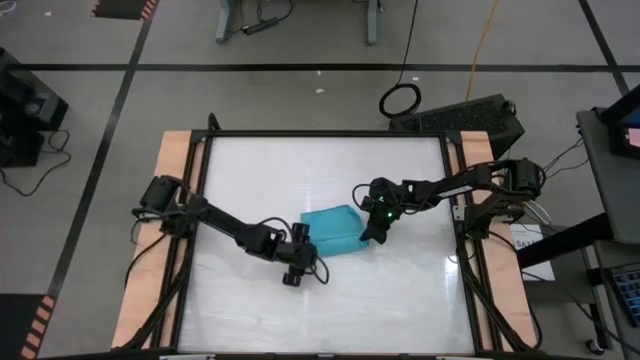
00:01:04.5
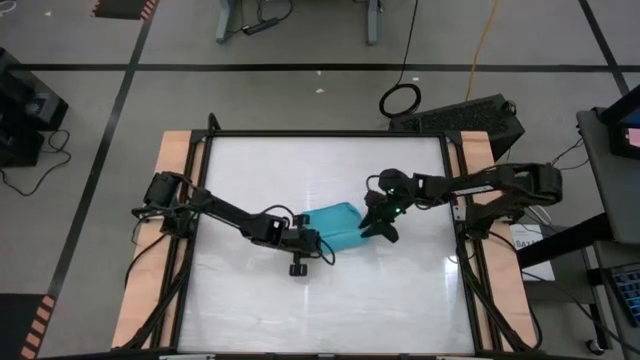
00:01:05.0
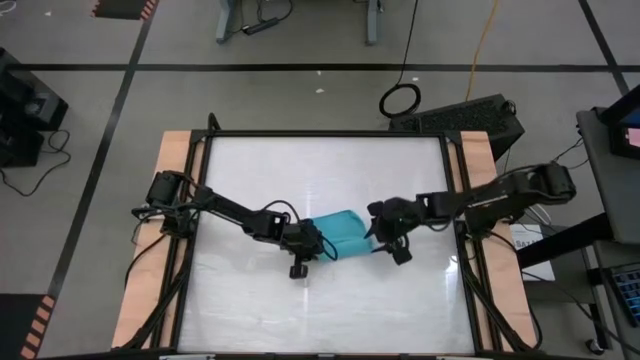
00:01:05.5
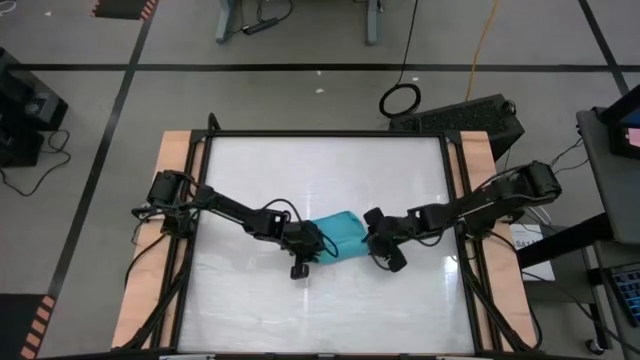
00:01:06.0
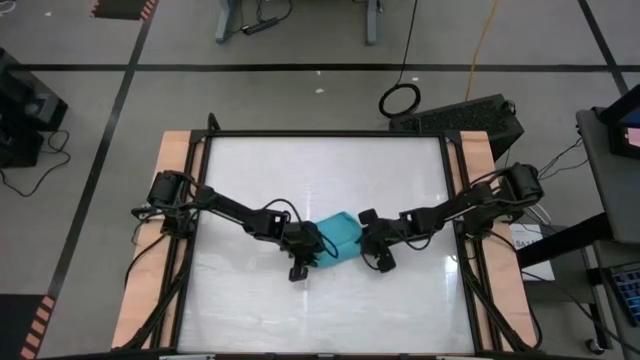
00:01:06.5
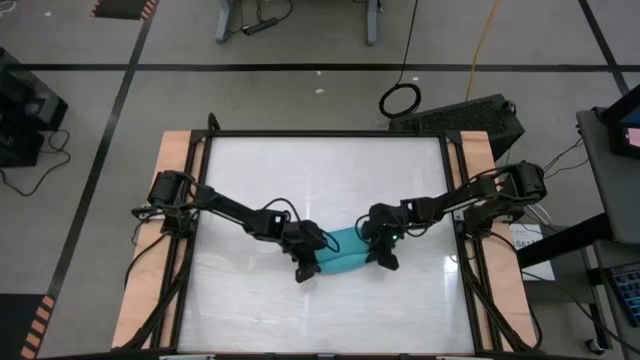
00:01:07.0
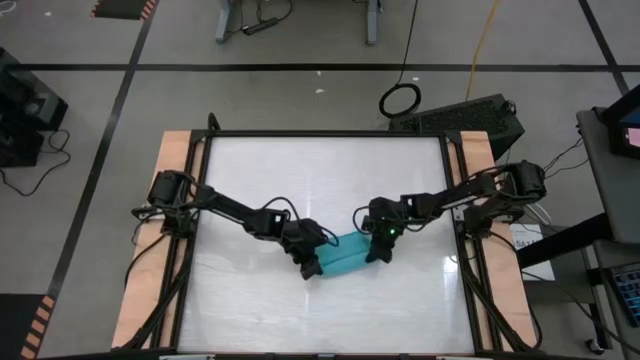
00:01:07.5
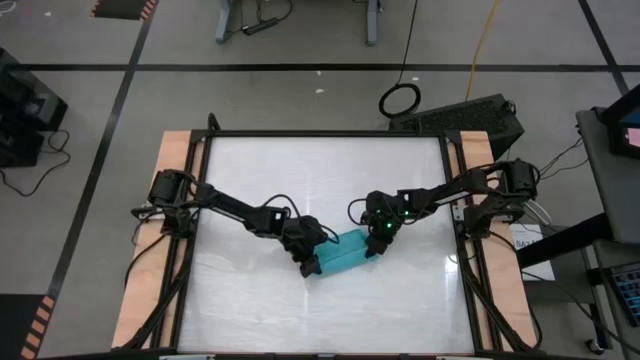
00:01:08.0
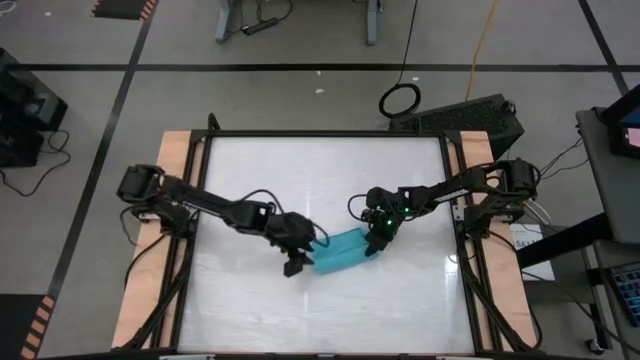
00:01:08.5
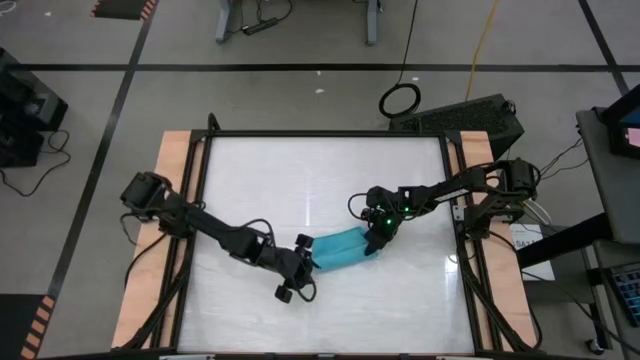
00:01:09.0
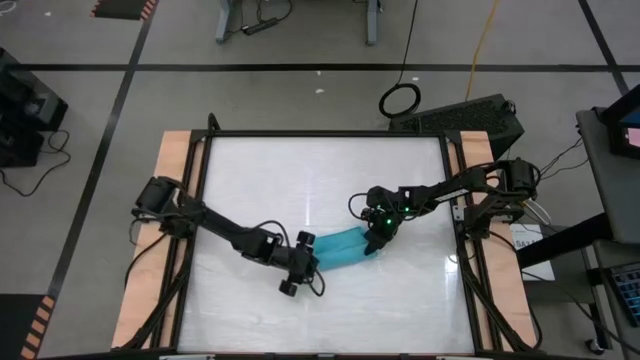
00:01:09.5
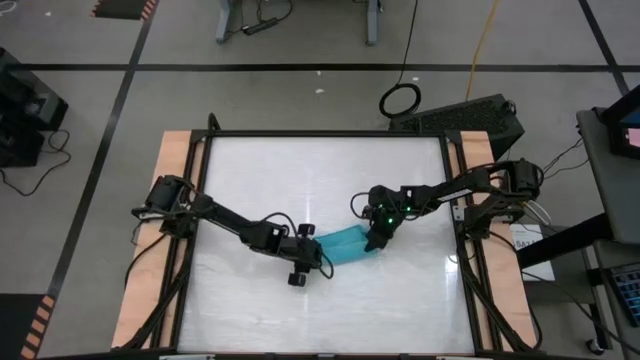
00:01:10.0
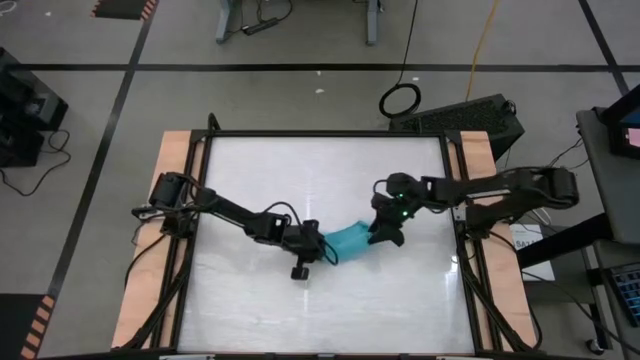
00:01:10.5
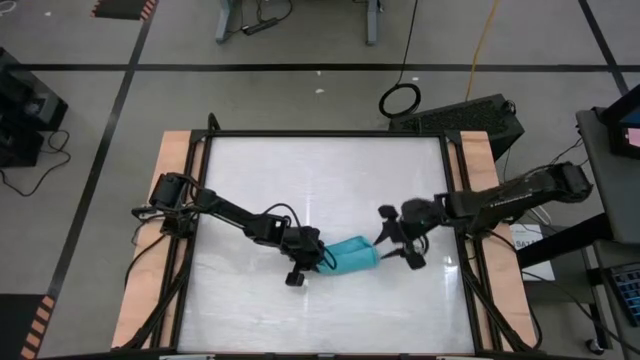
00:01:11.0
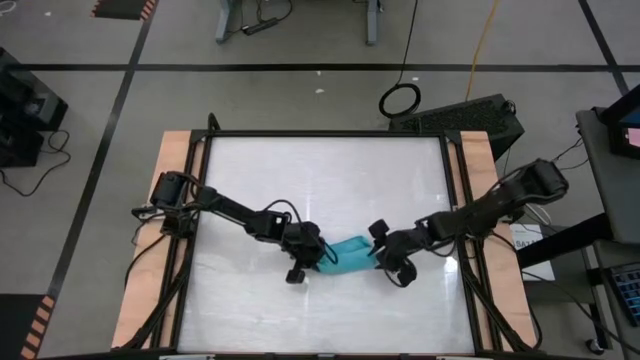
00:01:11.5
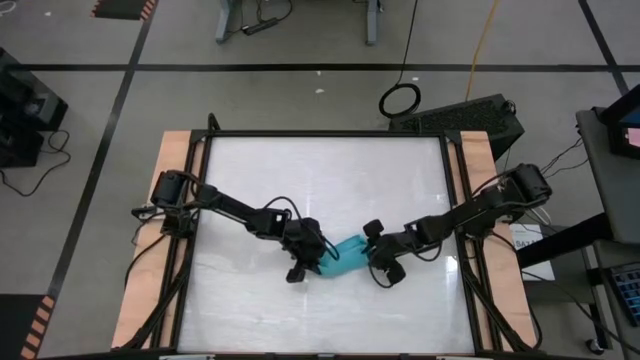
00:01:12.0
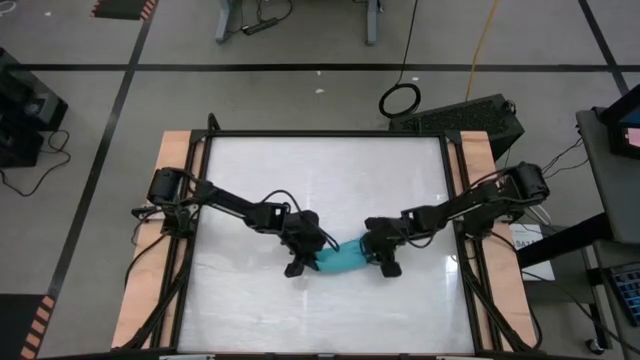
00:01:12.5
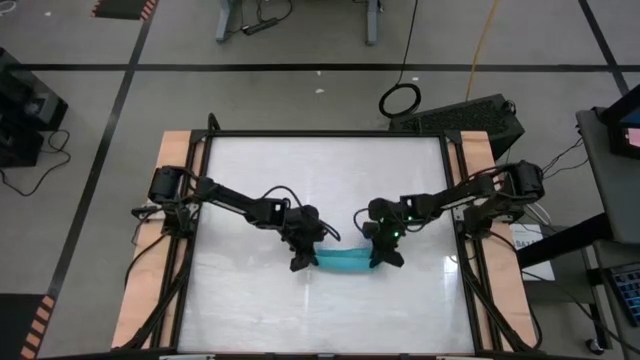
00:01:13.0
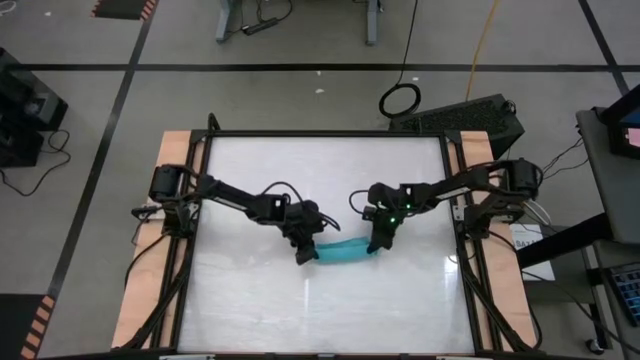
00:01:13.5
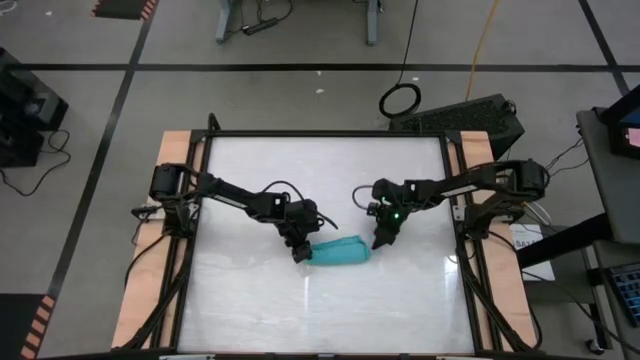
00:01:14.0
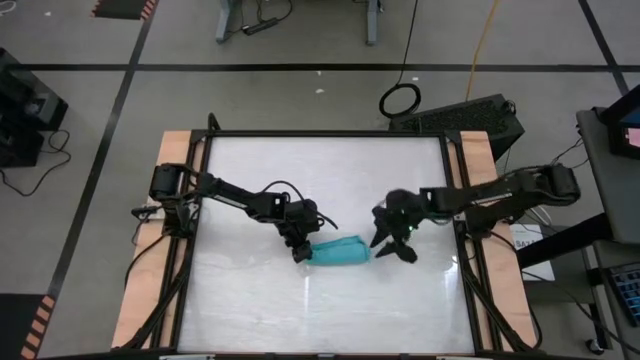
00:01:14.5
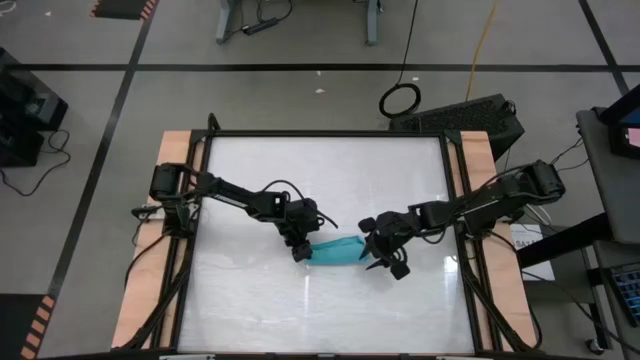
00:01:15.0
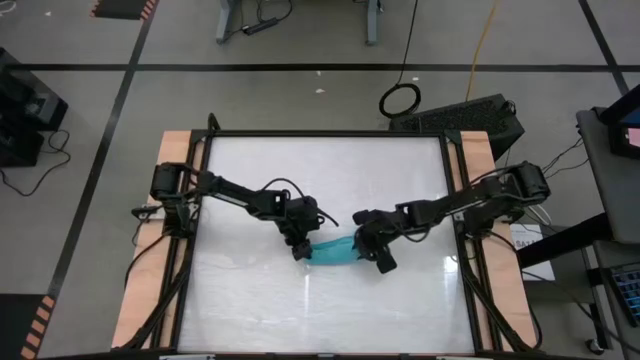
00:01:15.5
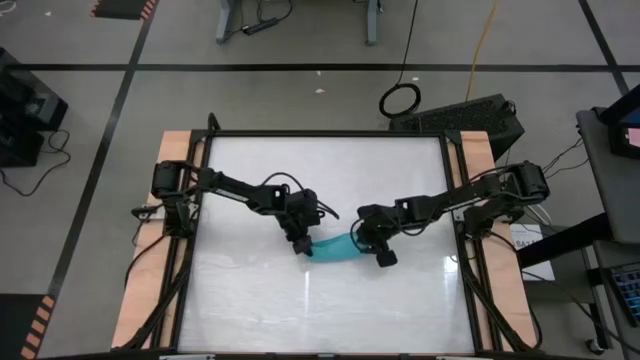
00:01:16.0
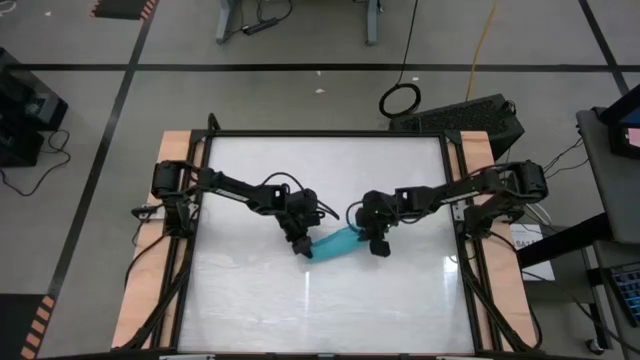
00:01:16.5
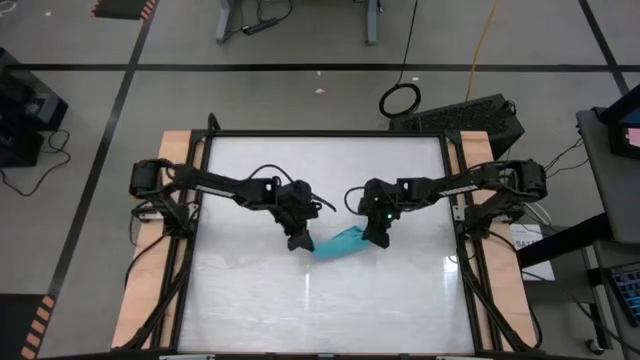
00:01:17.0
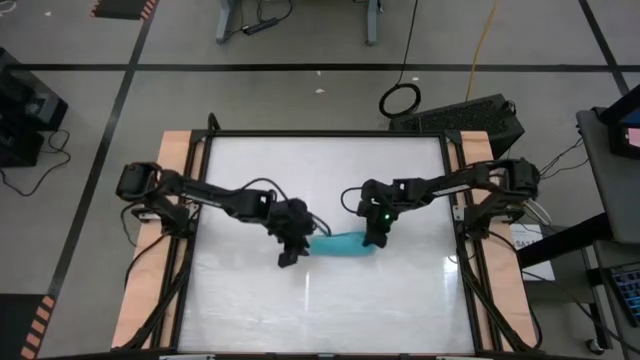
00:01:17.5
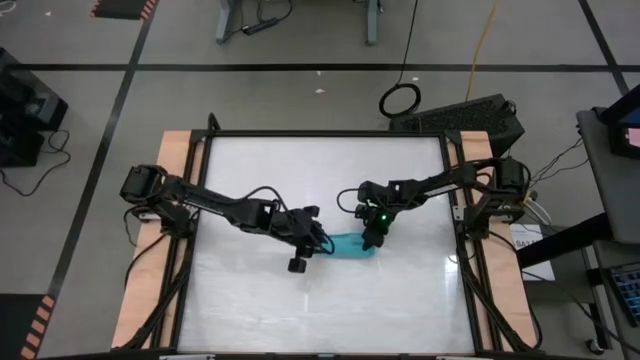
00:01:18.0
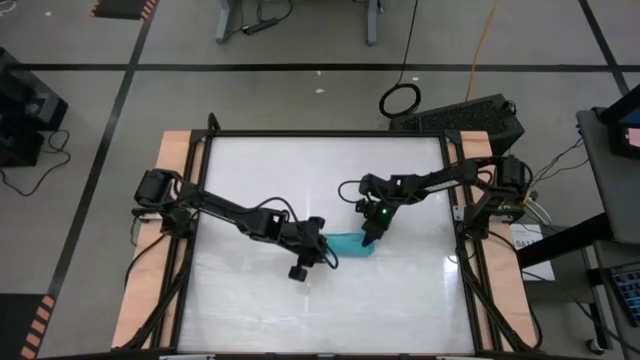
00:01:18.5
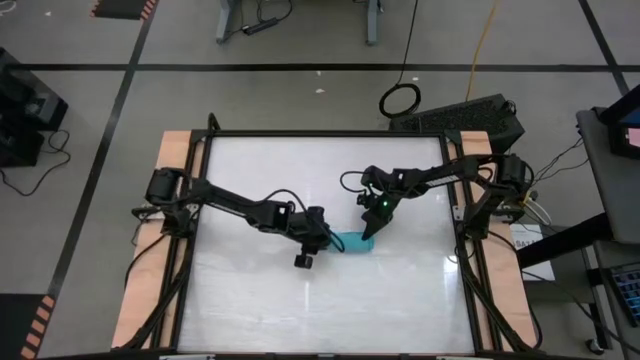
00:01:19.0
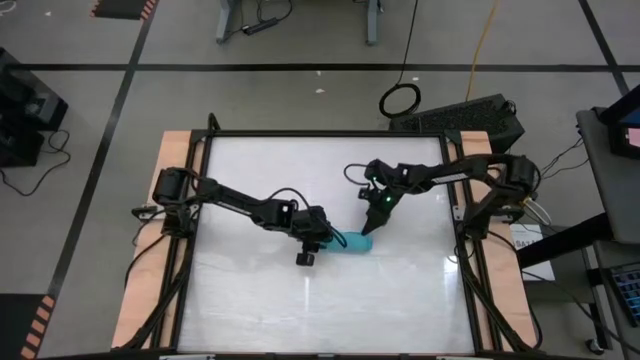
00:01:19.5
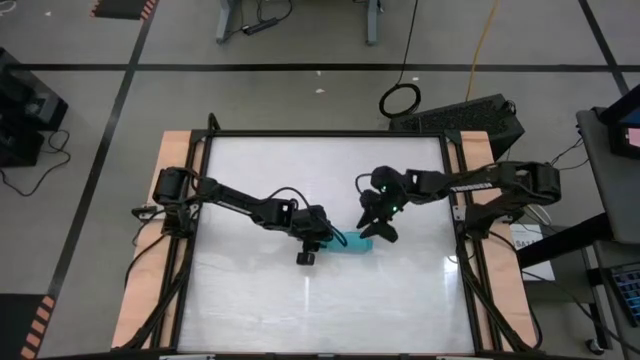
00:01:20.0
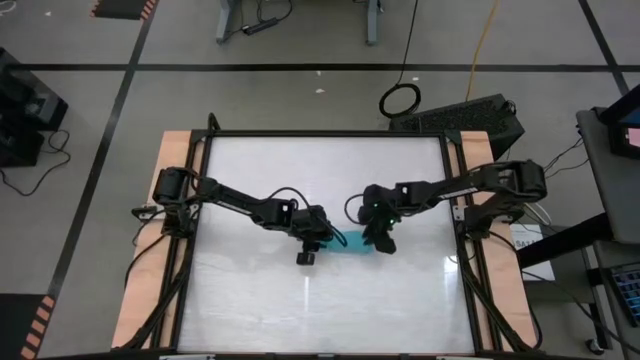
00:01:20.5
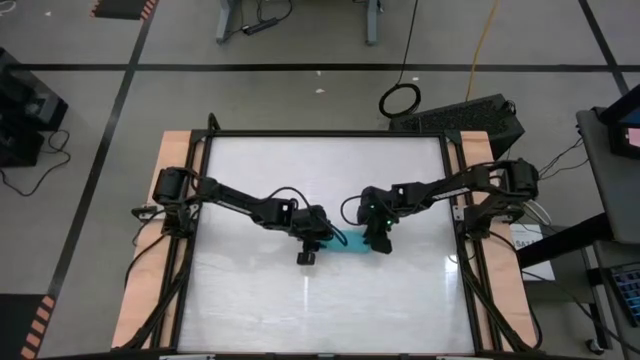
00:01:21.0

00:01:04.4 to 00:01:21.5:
Task: Roll towel
Roll the blue microfiber towel
